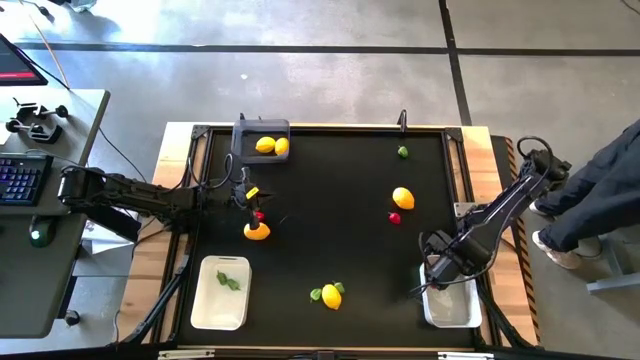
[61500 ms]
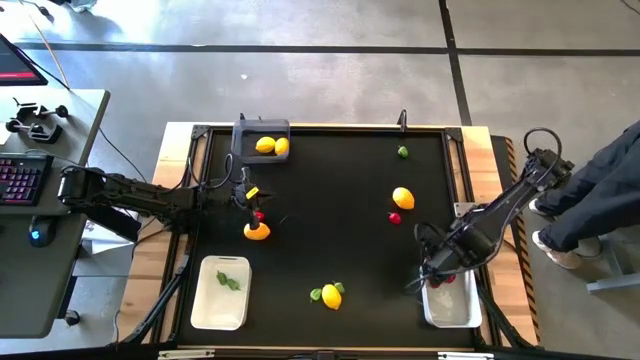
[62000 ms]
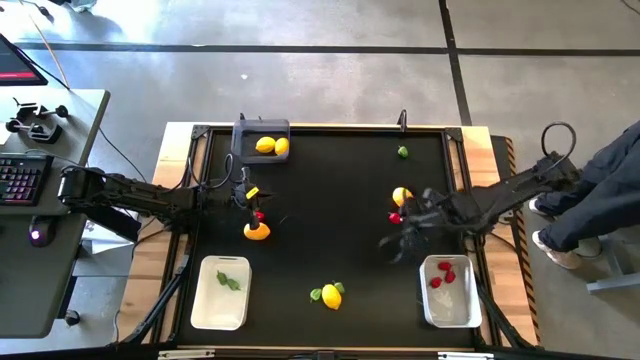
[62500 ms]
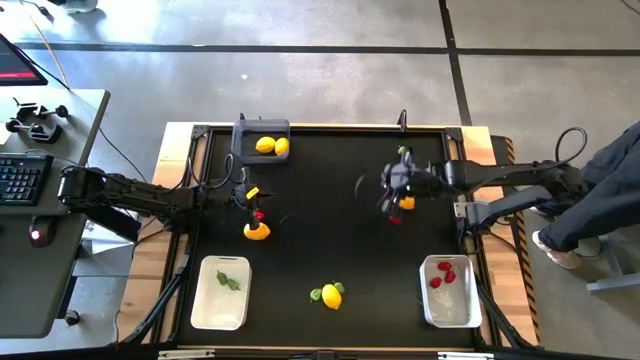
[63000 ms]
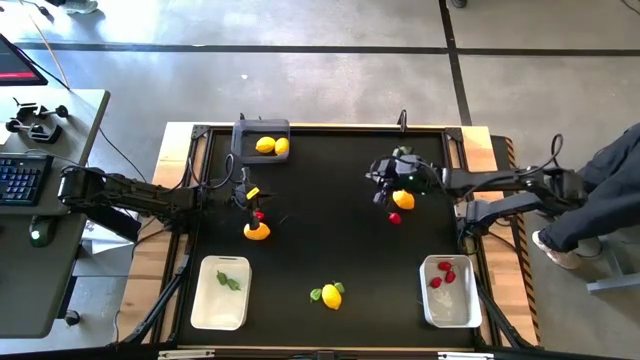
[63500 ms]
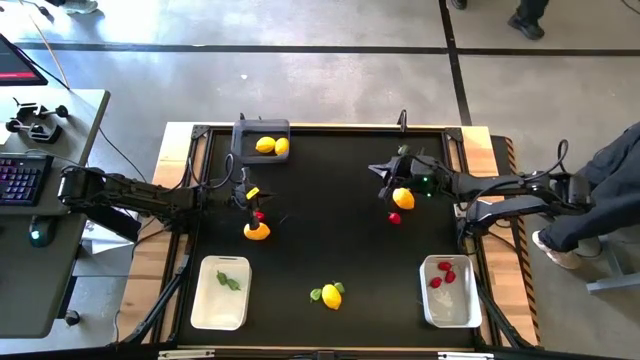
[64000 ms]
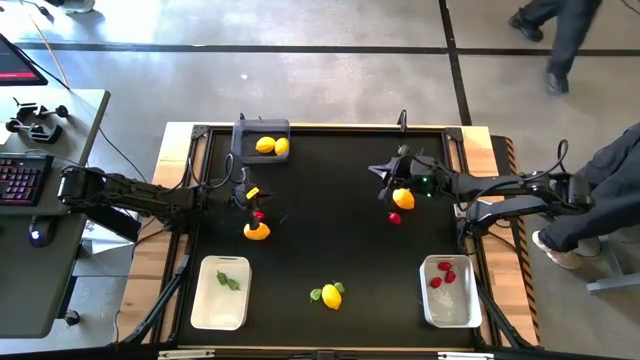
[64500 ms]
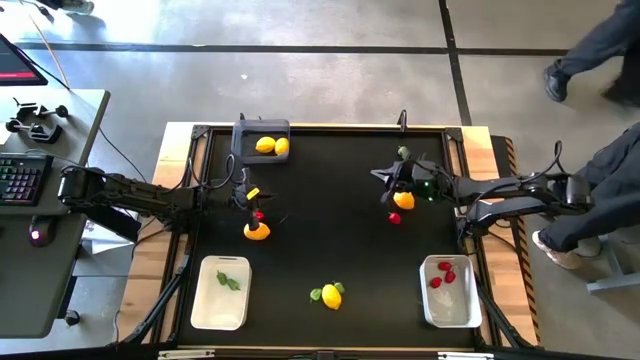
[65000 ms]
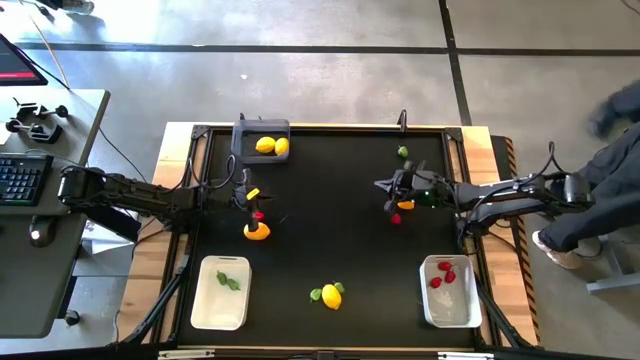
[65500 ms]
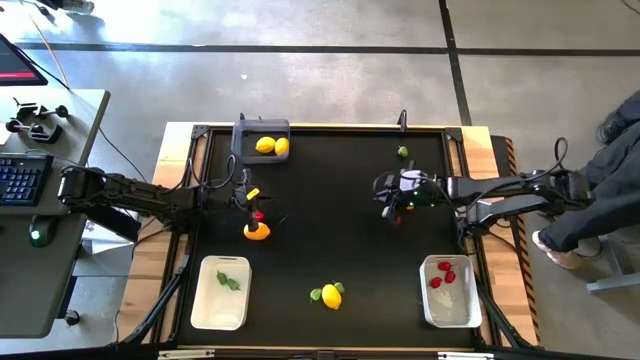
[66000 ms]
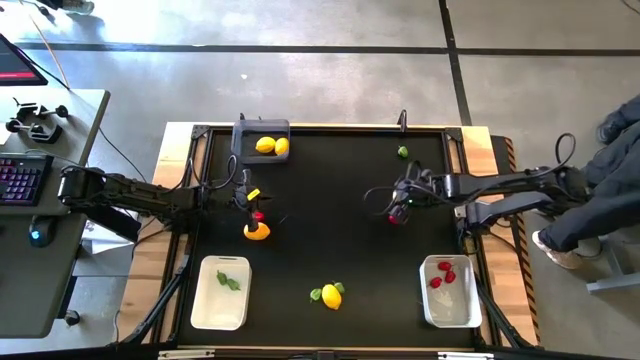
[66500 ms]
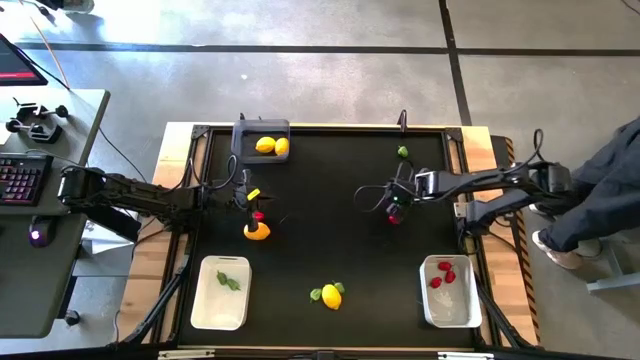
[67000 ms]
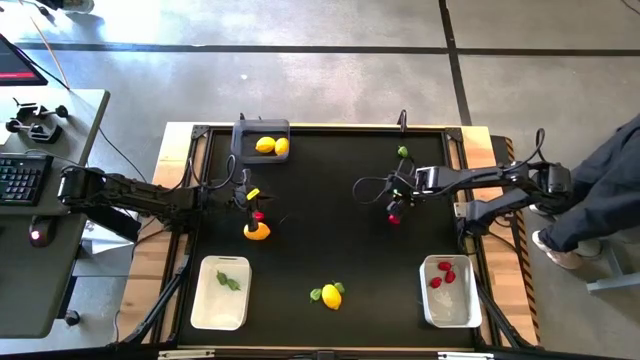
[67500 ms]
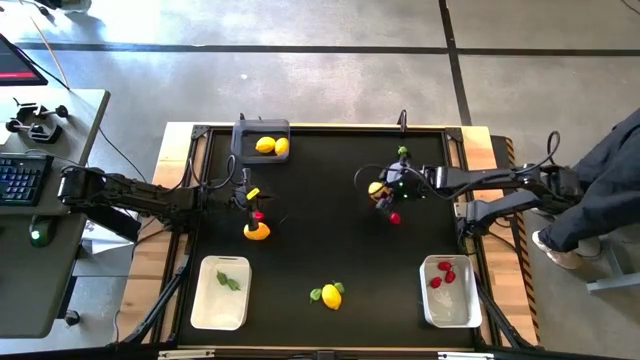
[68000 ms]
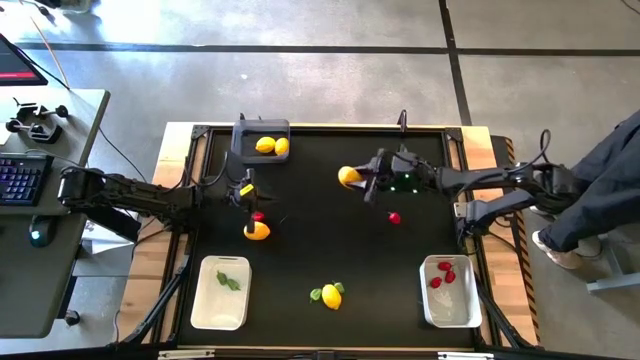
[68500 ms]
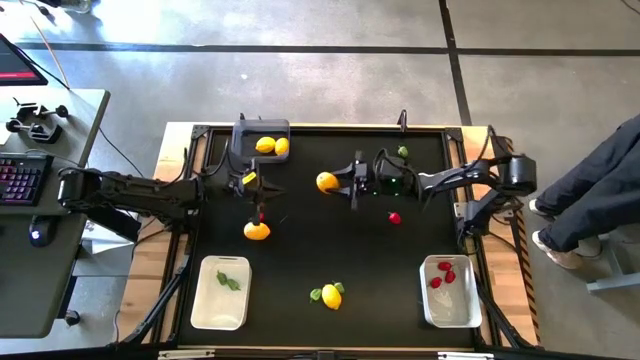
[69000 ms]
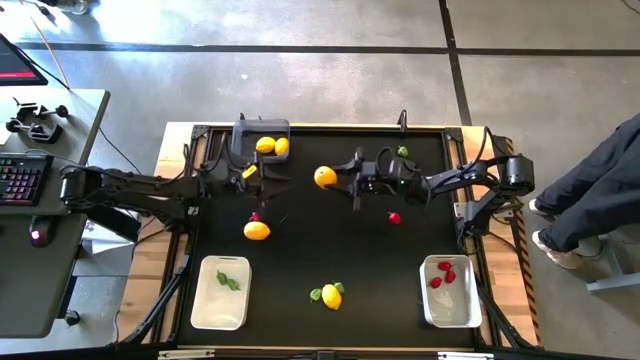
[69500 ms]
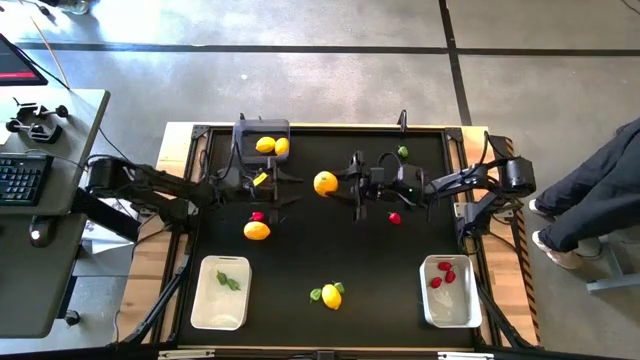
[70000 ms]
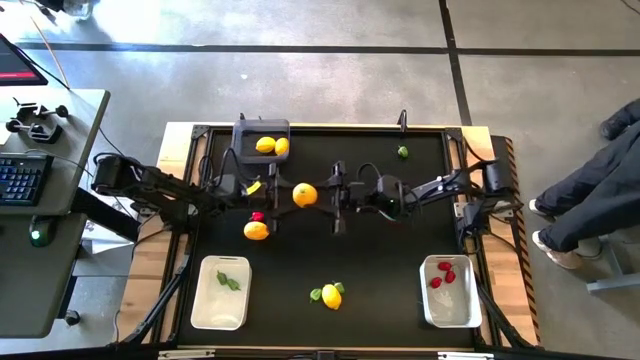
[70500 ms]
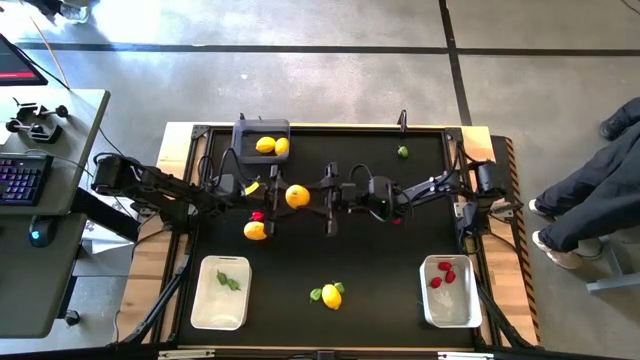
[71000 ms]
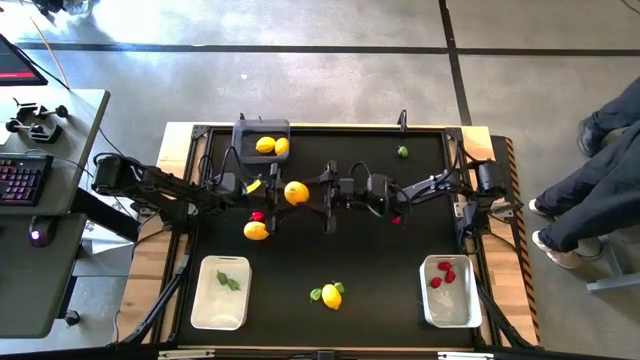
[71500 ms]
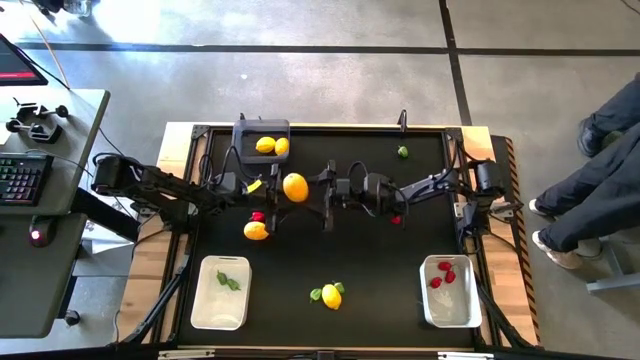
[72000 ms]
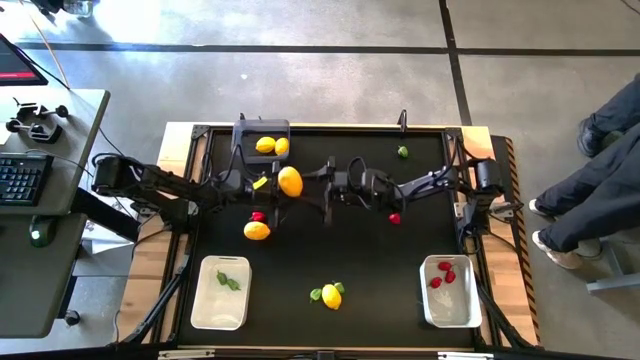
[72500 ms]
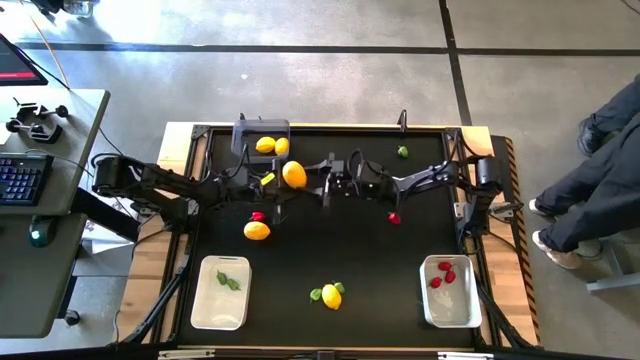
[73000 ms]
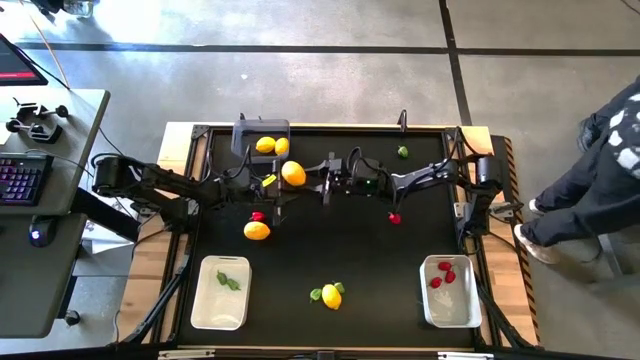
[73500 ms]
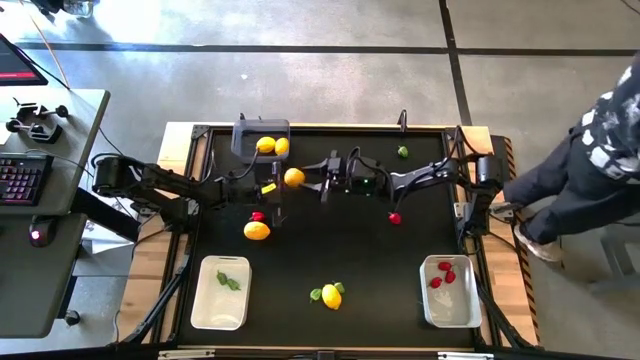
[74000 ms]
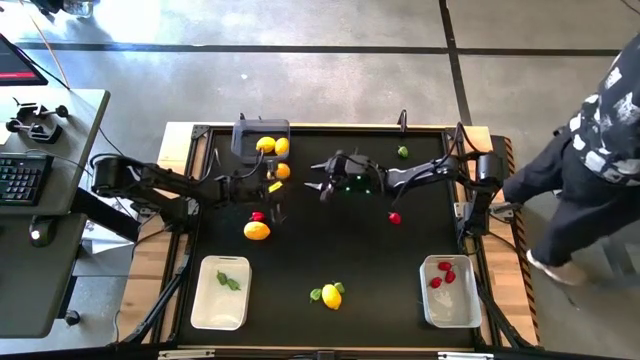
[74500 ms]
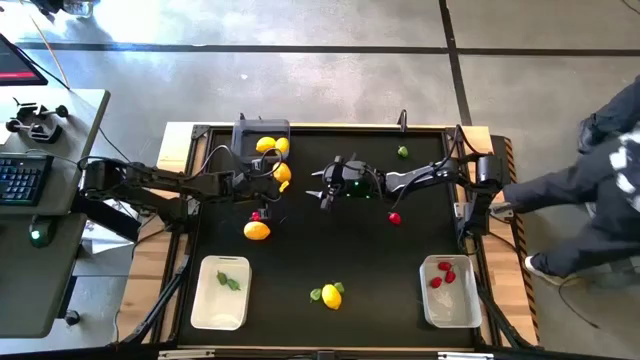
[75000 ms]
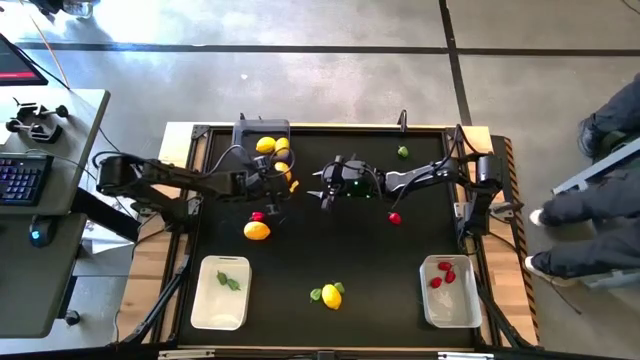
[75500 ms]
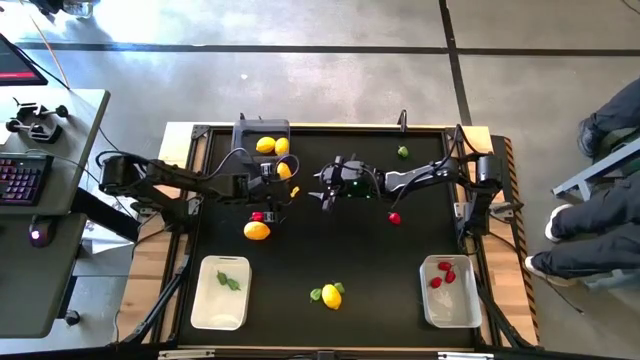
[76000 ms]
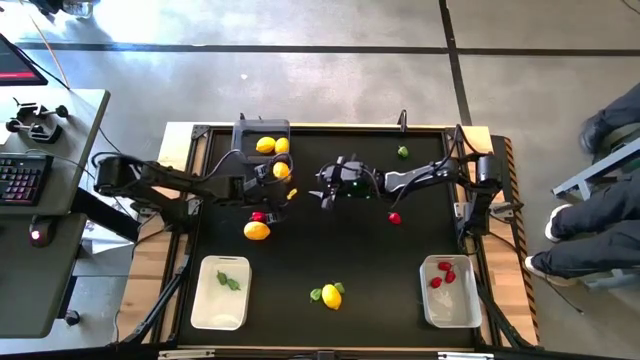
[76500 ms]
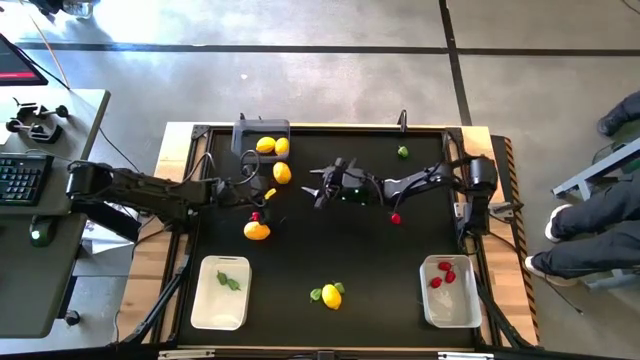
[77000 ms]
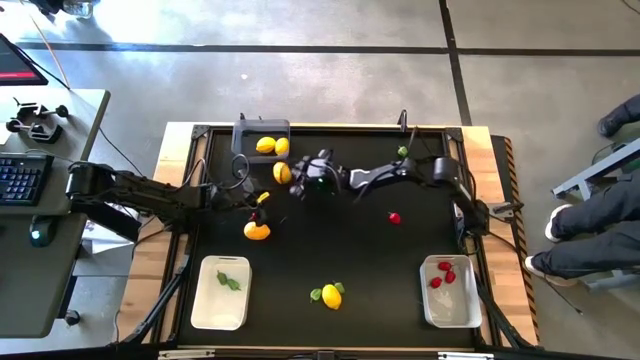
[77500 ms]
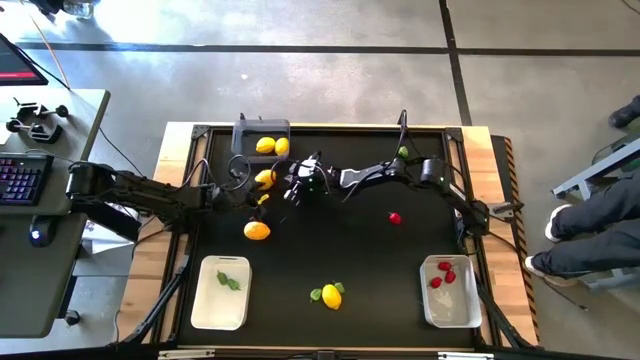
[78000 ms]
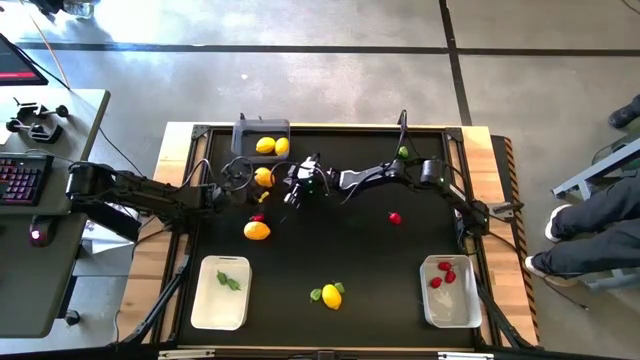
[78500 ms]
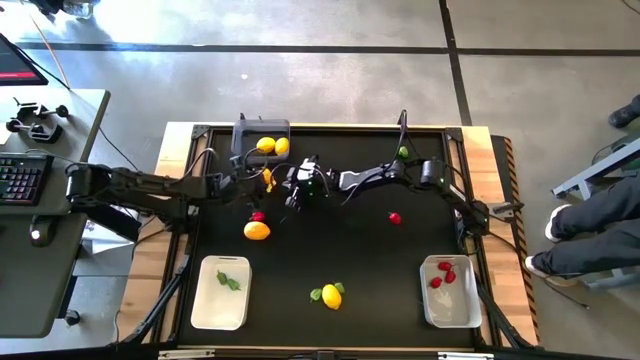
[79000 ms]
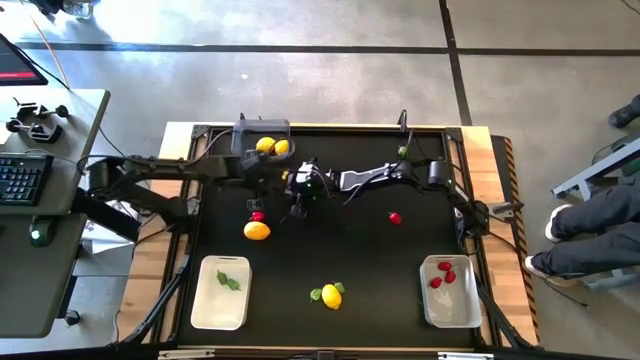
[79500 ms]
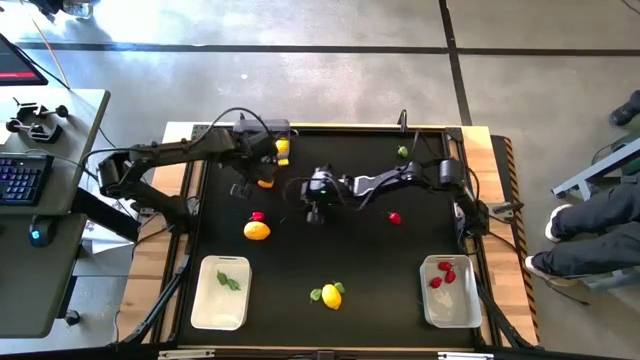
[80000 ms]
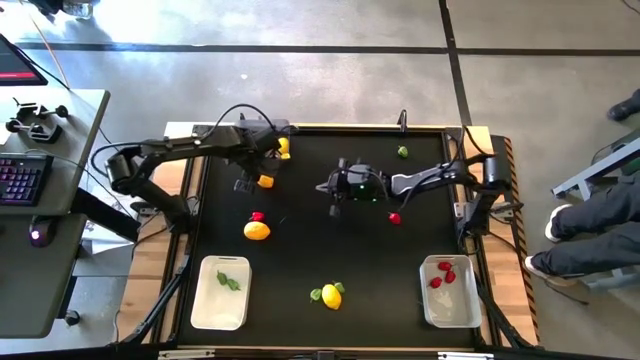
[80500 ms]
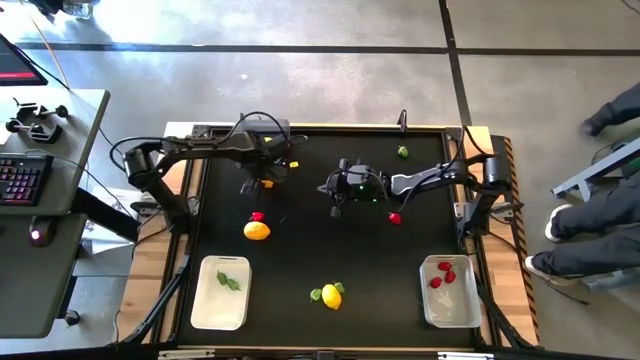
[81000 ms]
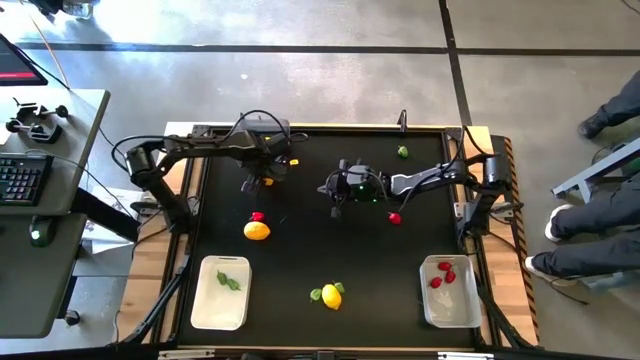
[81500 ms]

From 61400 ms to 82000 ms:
Task: Sort produce into baskets
Put the yellow lemon into the black bin

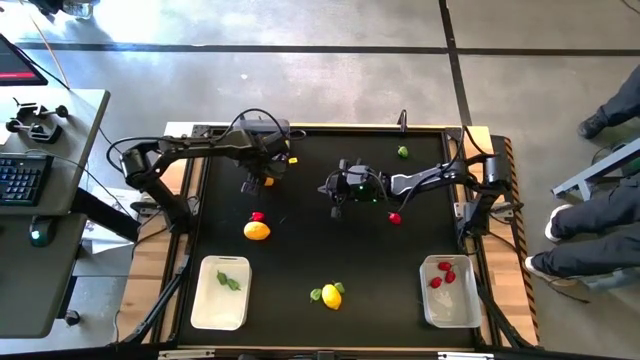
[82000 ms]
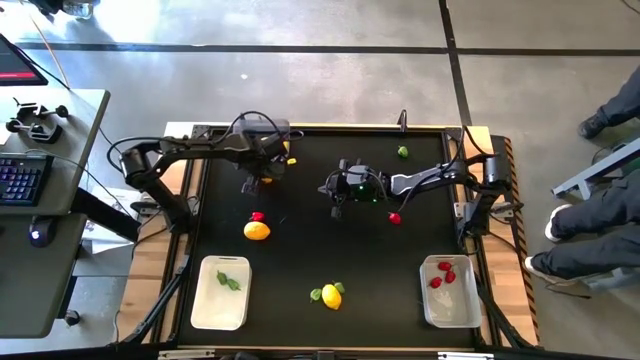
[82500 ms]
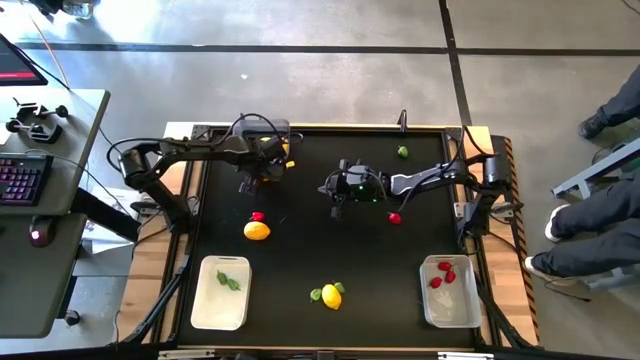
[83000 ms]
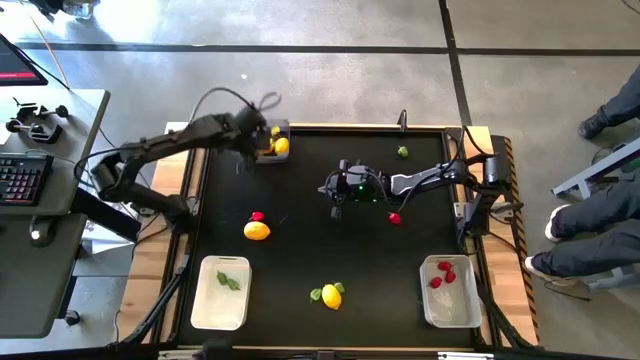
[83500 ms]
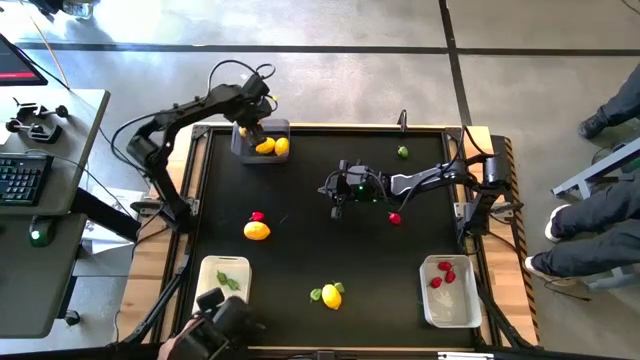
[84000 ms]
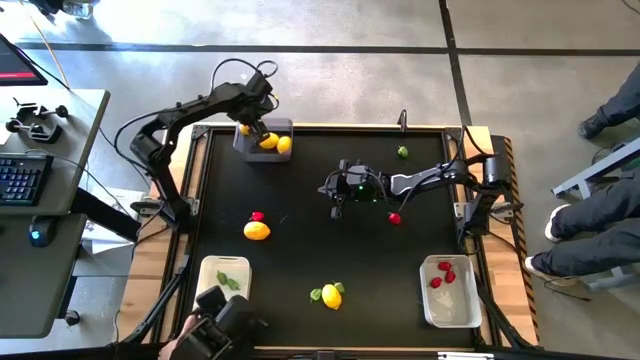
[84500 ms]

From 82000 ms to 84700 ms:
Put the yellow lemon into the black bin
